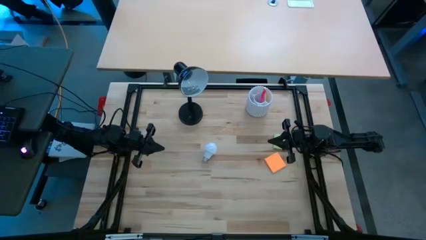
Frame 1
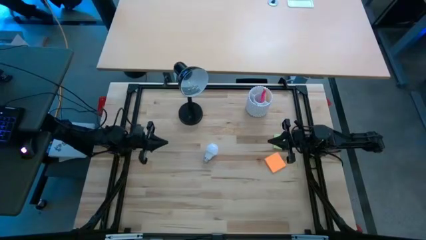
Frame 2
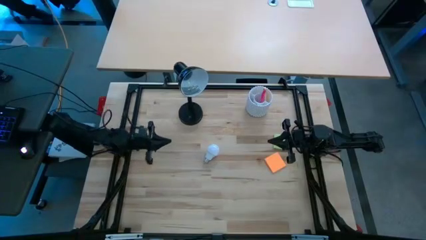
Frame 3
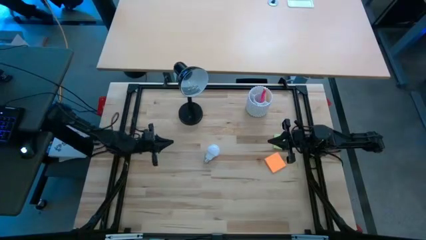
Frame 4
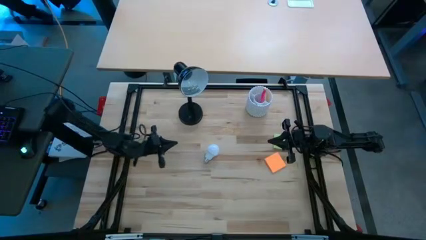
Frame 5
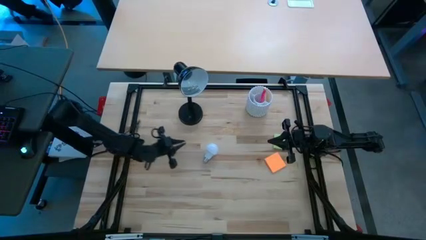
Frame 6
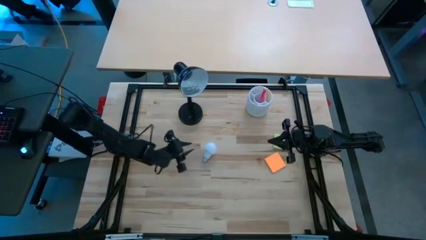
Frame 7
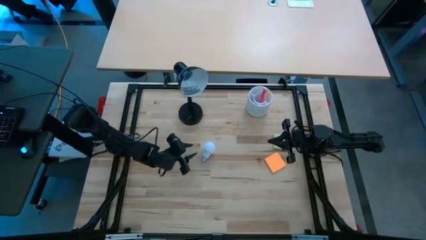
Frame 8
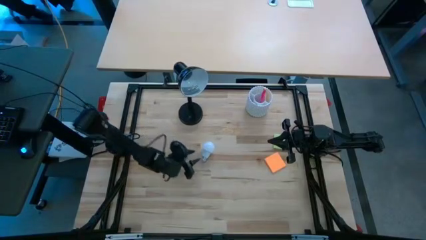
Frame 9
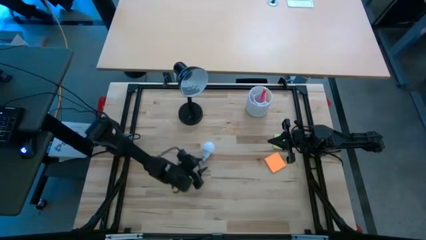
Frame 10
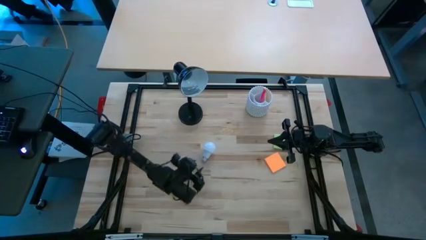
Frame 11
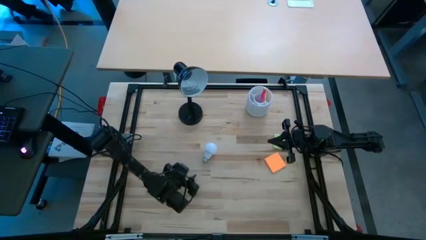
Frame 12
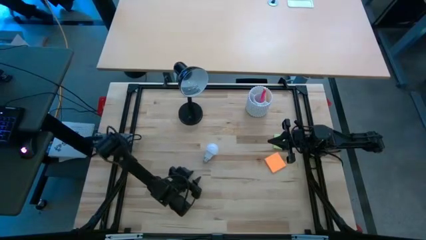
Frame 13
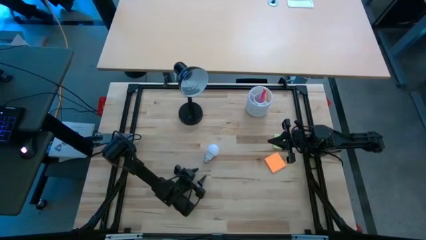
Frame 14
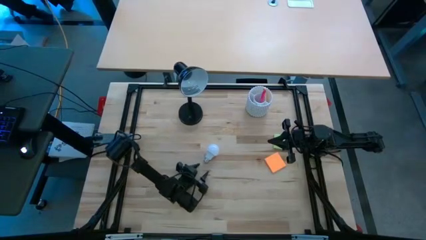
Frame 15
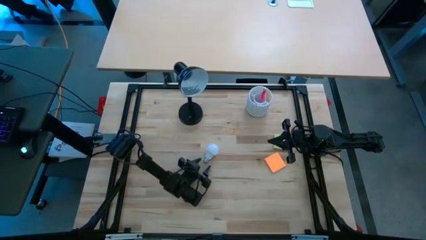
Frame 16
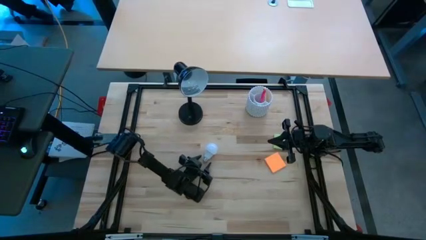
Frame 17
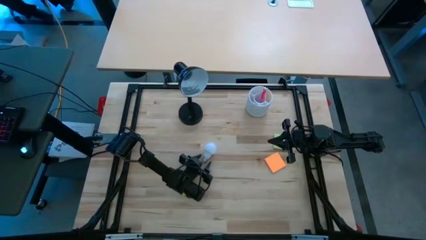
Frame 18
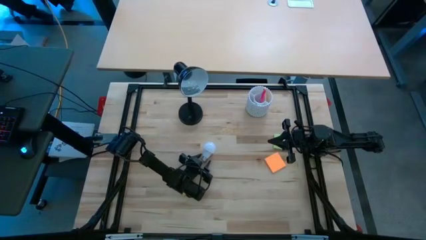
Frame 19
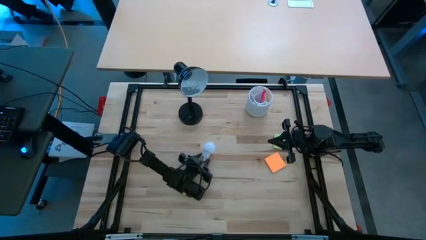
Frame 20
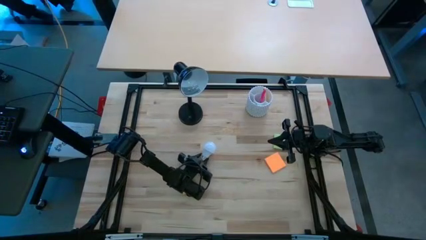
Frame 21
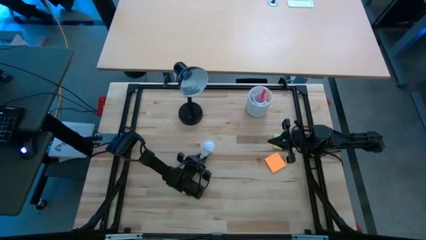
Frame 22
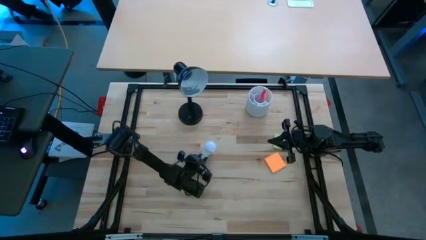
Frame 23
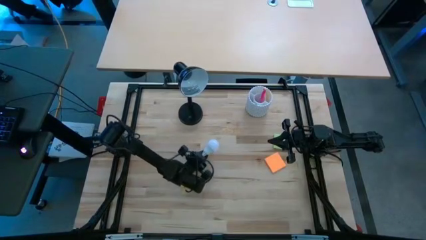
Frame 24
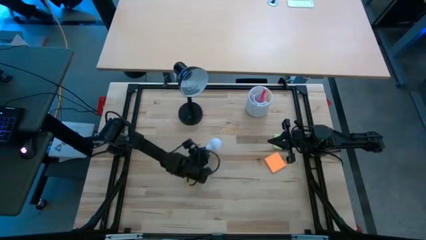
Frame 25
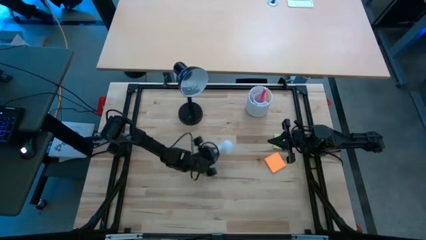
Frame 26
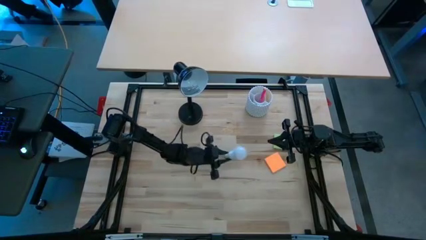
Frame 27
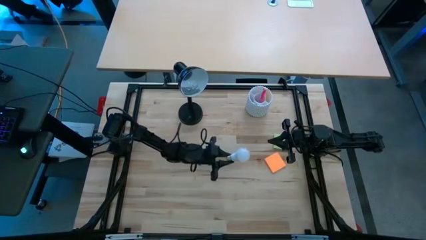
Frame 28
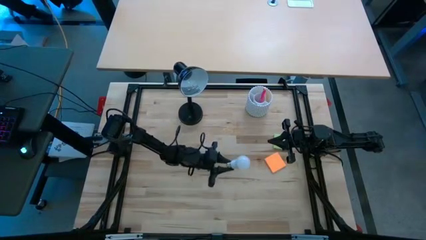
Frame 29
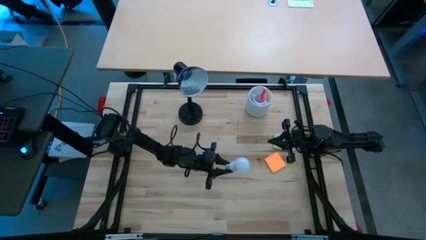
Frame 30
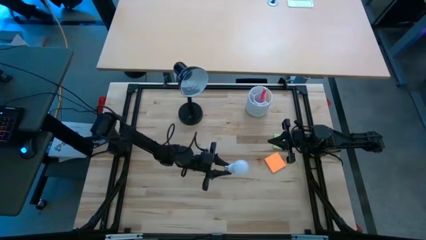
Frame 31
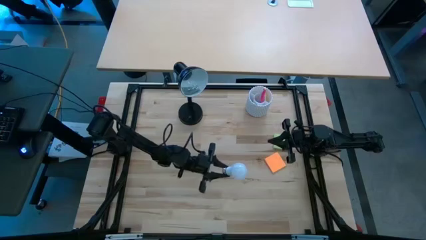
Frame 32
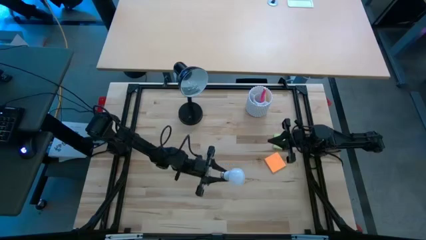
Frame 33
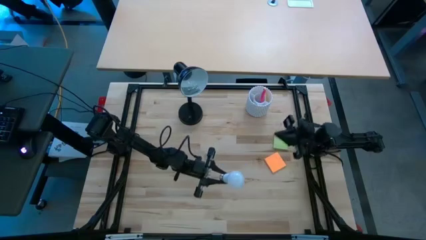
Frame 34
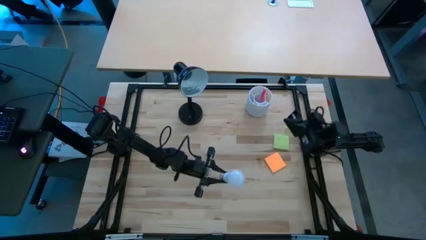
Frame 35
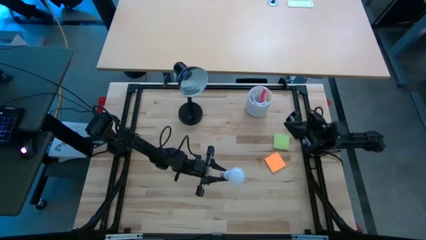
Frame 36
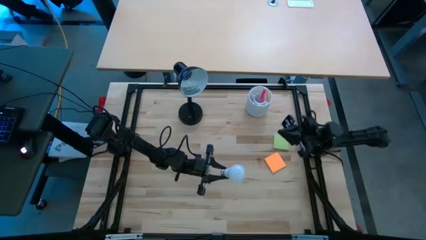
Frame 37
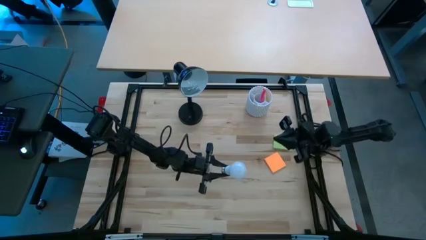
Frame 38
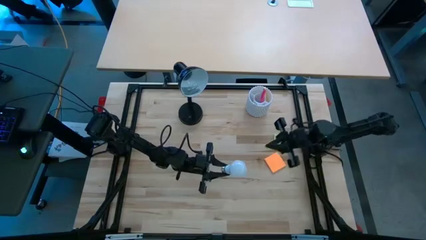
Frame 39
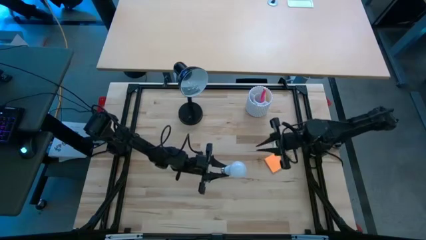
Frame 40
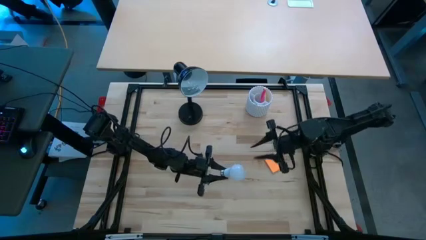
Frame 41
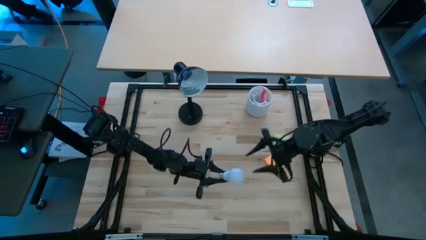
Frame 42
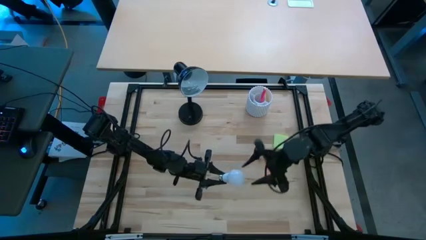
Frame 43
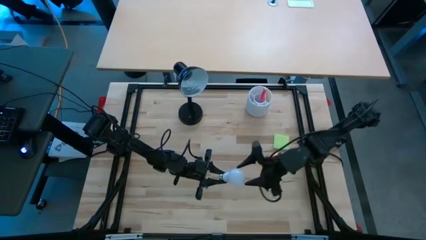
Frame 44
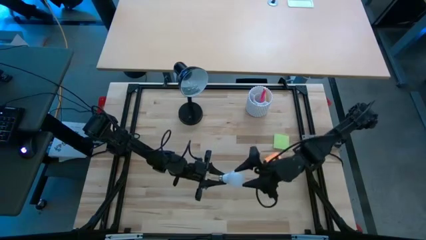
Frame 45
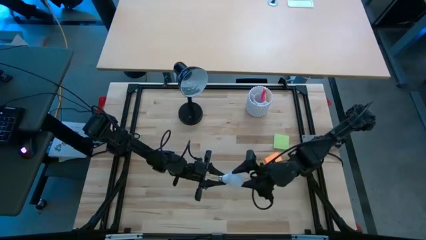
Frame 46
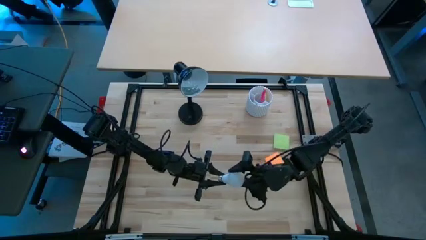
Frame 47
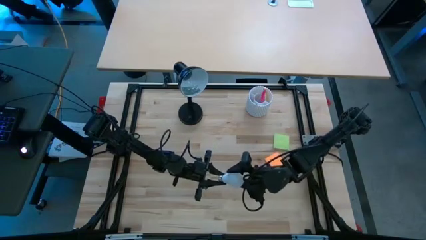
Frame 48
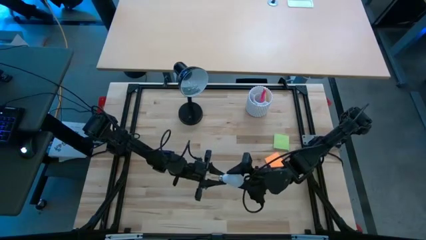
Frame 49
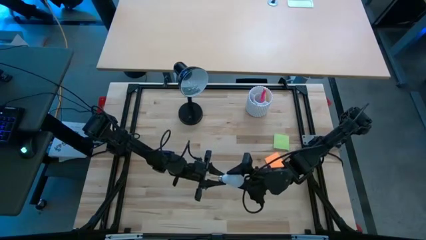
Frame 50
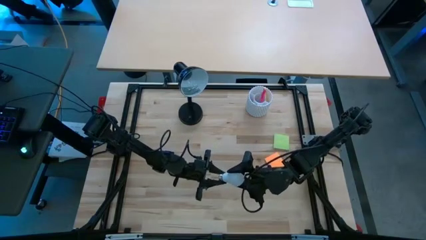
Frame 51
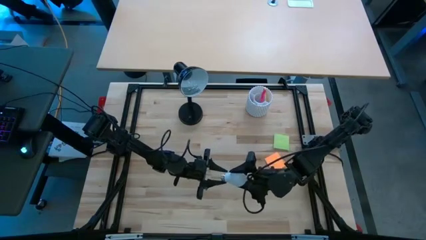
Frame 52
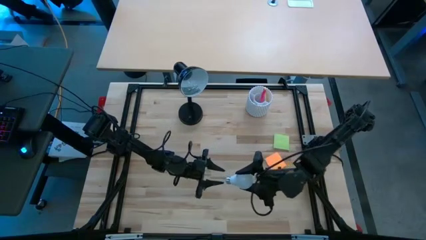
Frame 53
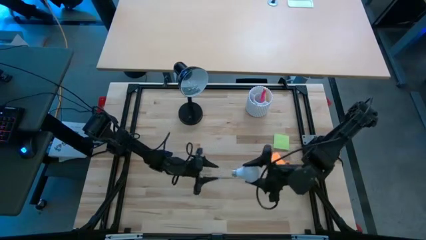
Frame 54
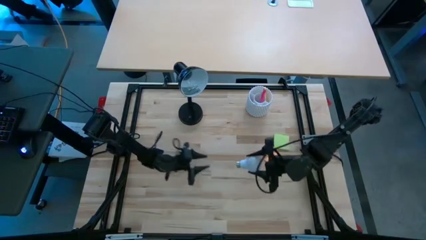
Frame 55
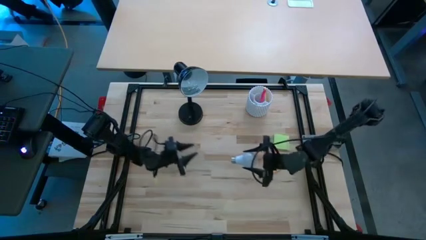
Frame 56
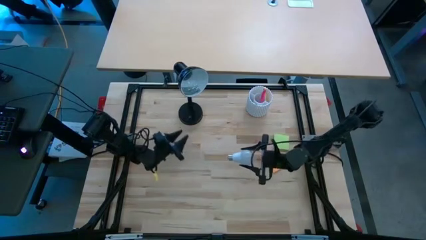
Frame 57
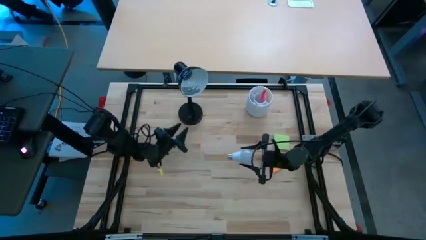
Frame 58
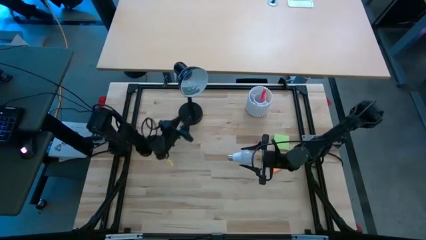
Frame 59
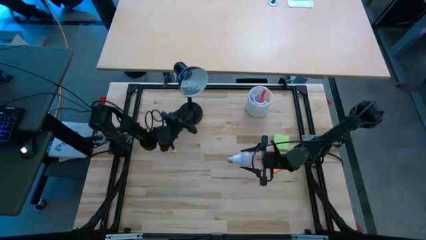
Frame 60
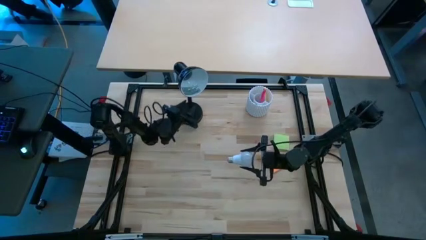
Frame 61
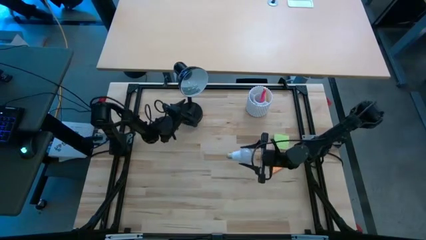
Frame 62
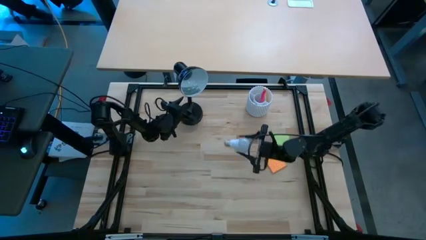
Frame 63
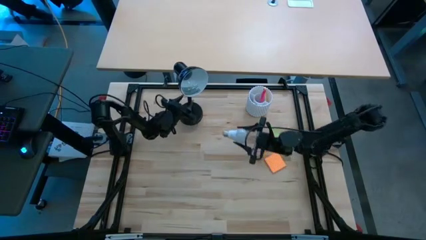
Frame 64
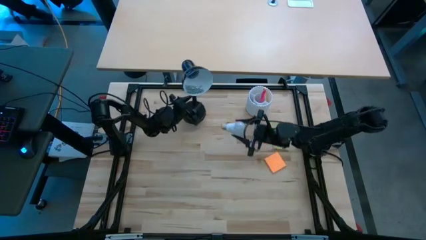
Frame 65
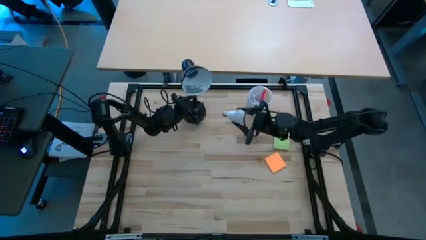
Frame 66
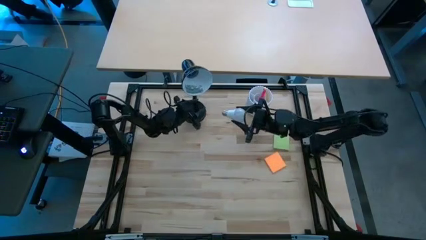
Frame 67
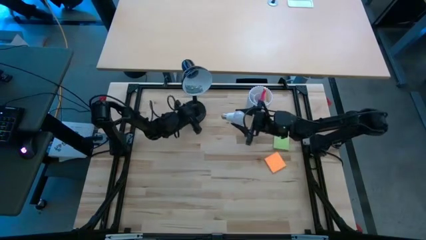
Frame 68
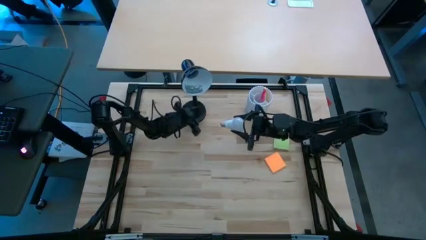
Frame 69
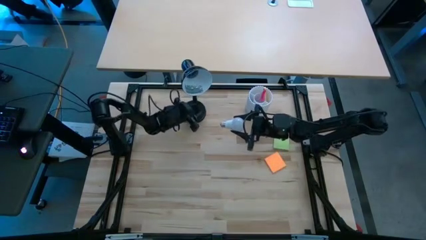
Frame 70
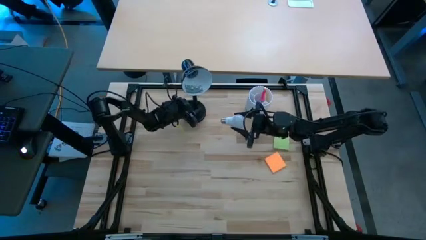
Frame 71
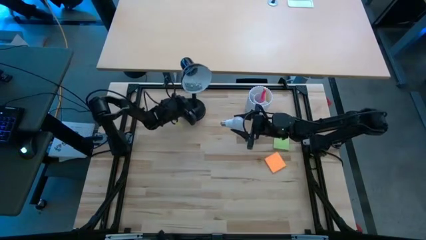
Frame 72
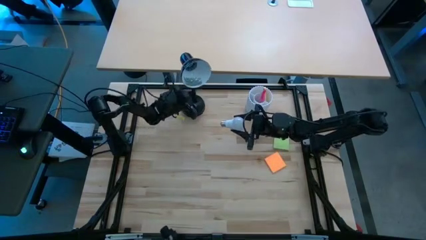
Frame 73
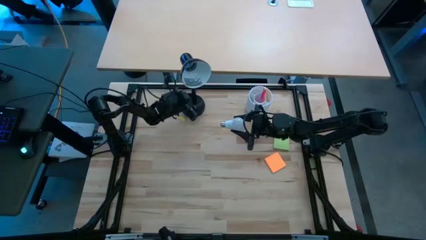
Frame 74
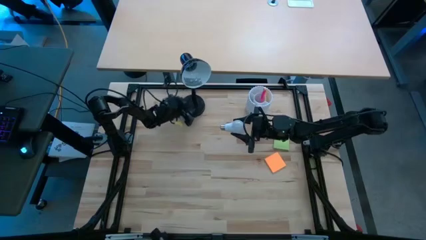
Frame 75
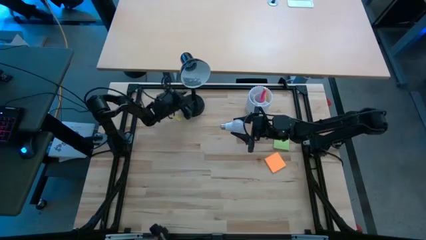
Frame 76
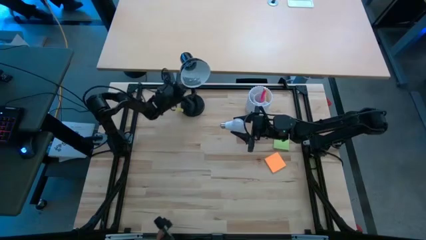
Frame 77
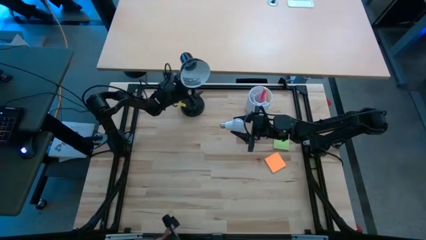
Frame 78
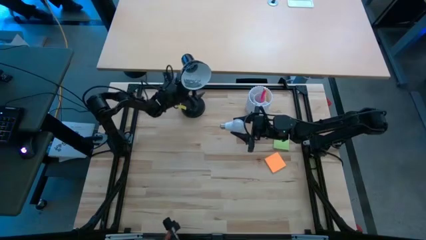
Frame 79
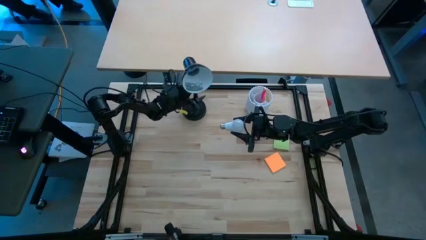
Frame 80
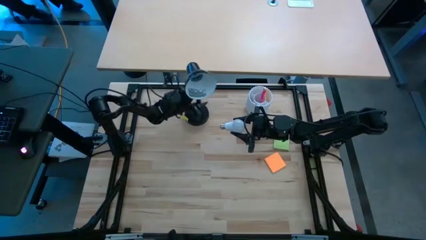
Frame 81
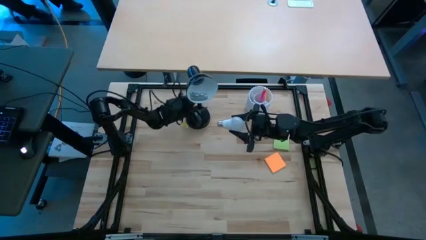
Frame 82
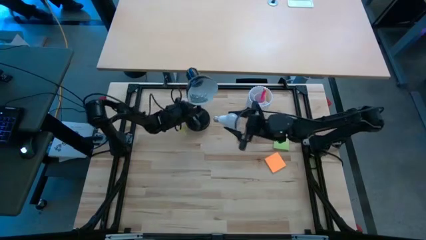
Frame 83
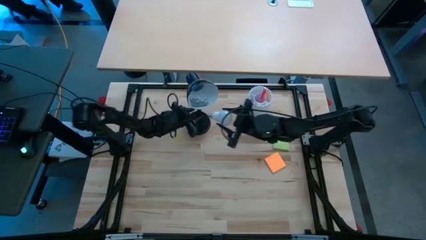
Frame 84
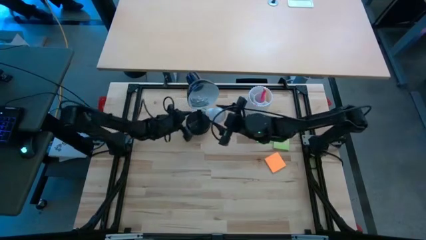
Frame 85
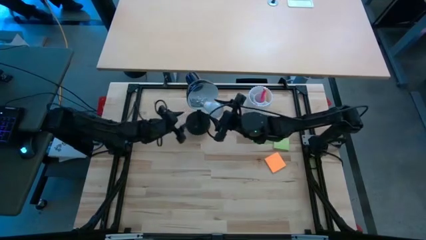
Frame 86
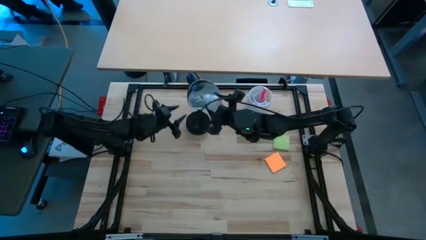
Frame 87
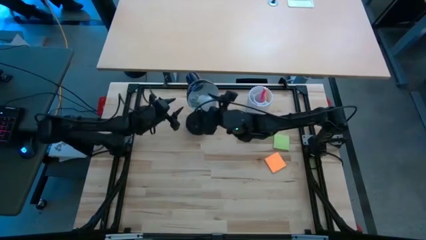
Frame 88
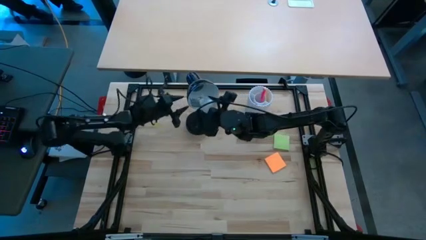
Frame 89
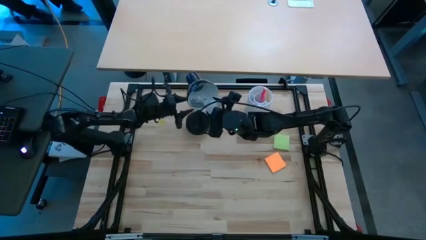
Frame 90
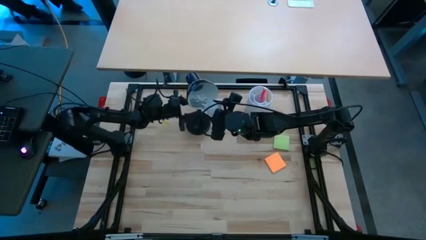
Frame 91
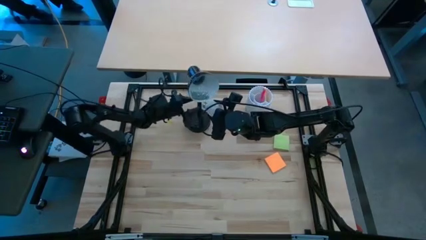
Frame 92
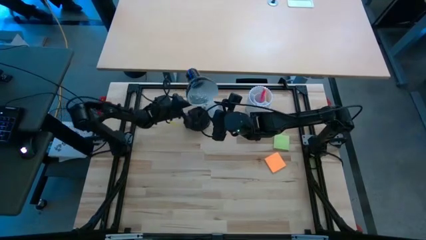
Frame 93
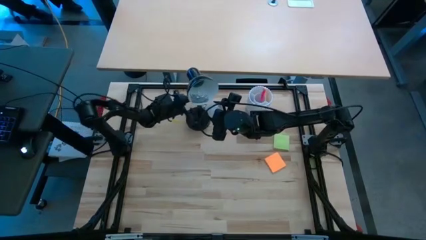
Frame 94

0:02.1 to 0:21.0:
Task: Screw lightbulb
Insert the white lightbulb into the black lamp
